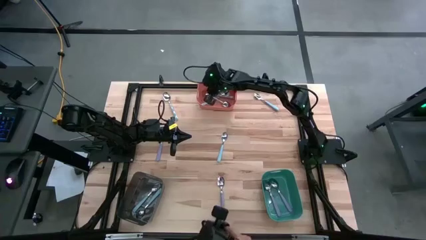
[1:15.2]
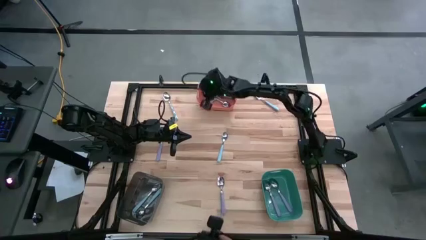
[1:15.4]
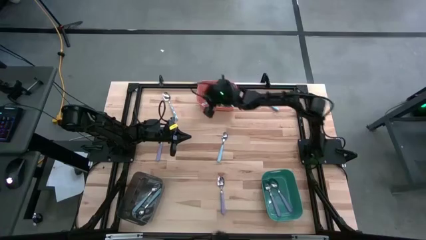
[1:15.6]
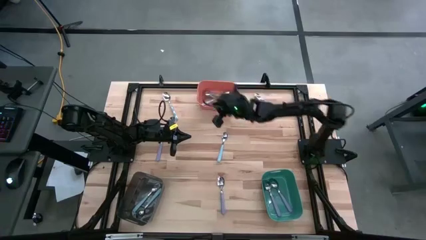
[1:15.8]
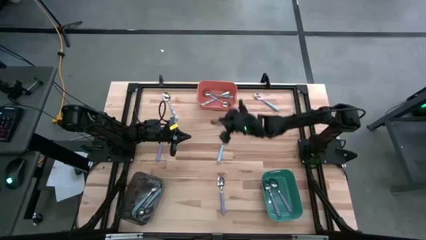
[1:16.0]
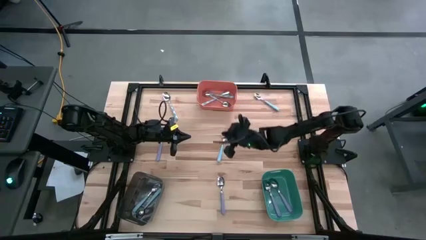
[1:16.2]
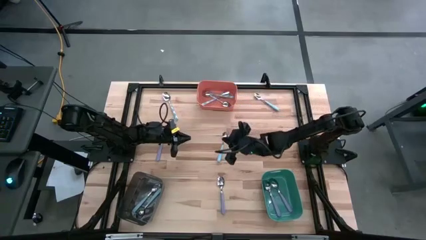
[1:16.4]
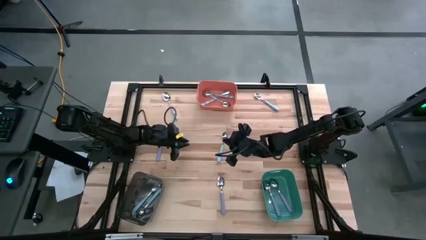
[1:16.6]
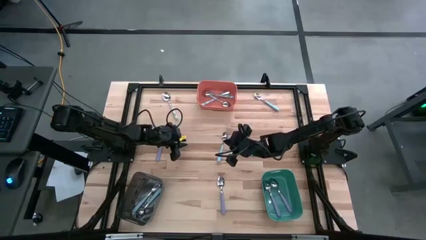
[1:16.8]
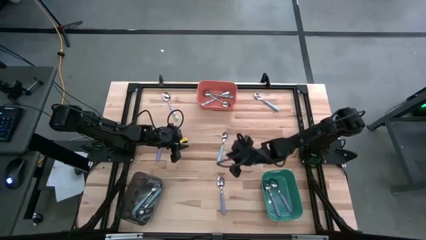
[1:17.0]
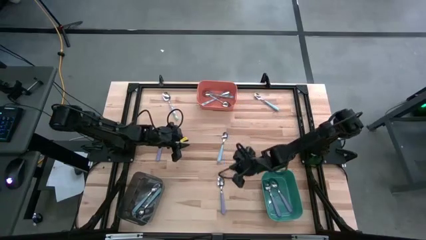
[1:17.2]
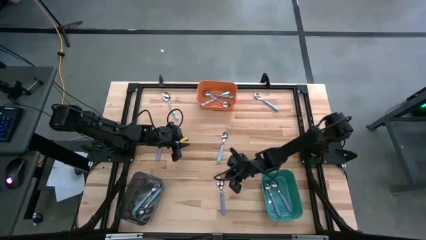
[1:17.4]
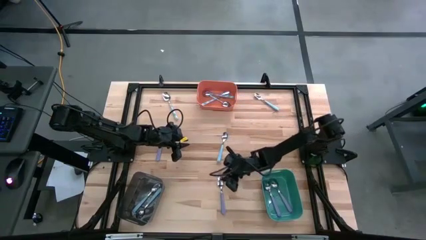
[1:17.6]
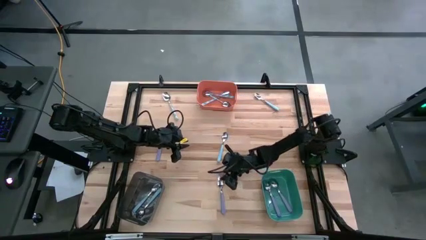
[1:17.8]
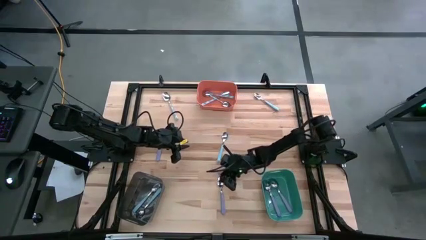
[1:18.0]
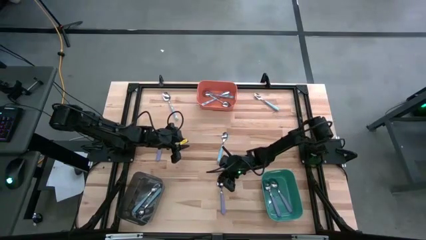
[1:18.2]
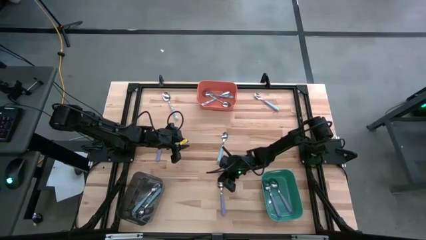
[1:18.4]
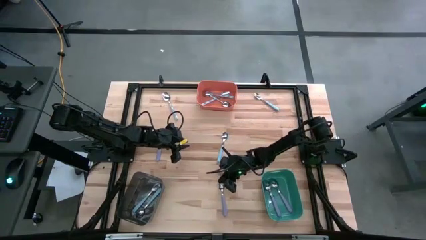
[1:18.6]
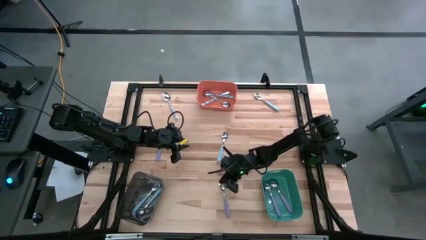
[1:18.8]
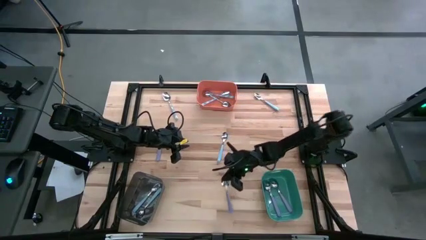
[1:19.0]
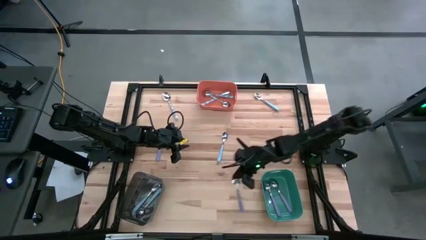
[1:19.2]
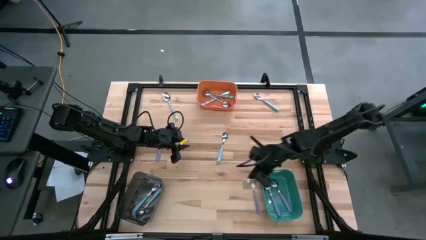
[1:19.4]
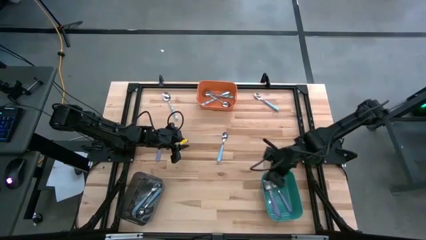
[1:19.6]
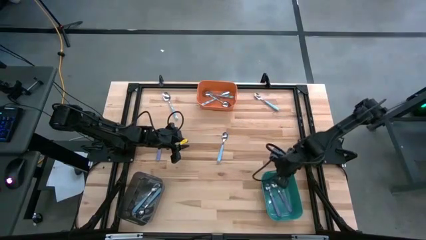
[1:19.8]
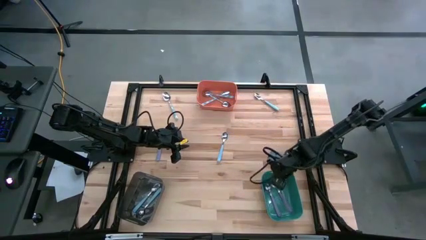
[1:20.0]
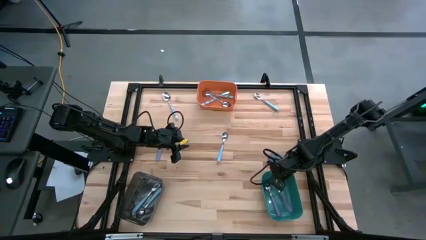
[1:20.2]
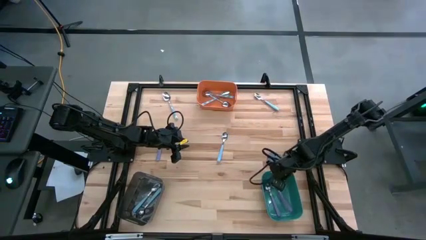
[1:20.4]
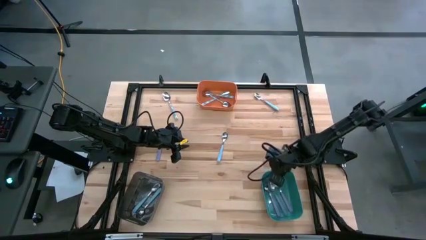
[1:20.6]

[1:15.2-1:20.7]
Task: Sort silverware by color (type)
Put the bottom violet spoon into the green bin

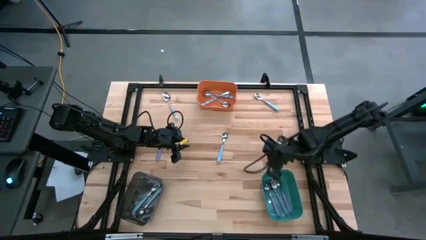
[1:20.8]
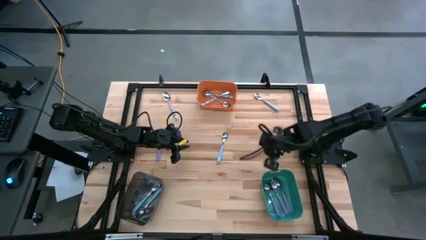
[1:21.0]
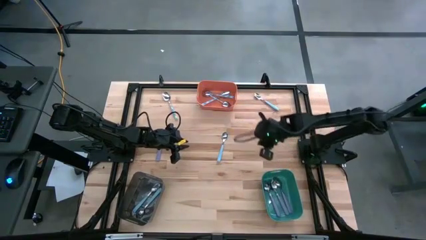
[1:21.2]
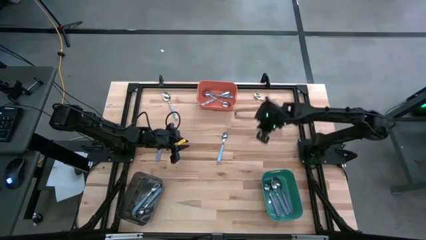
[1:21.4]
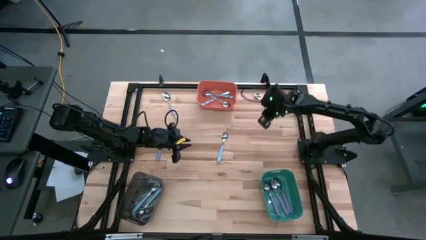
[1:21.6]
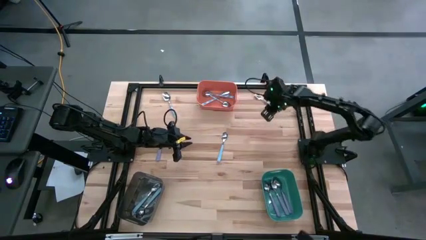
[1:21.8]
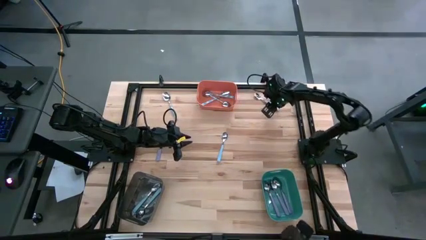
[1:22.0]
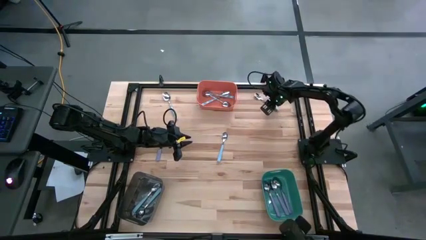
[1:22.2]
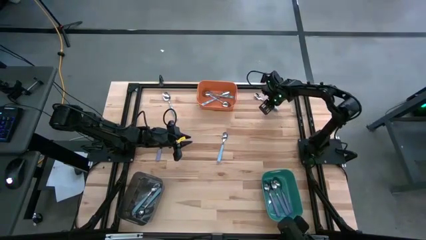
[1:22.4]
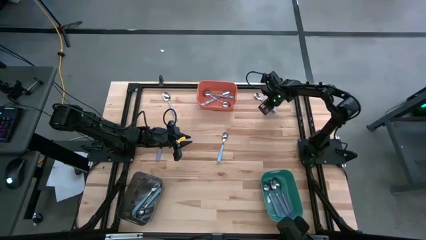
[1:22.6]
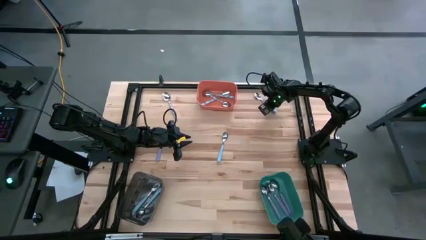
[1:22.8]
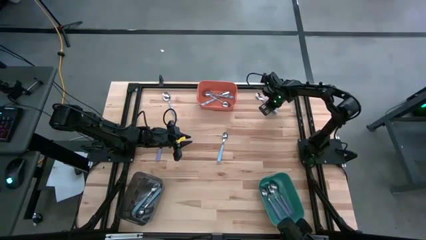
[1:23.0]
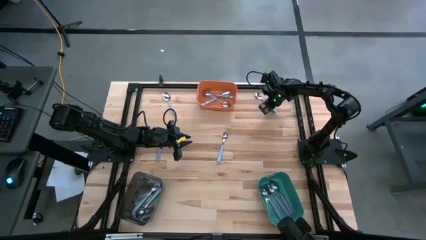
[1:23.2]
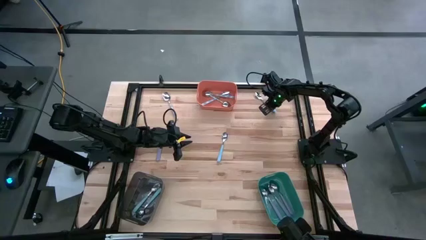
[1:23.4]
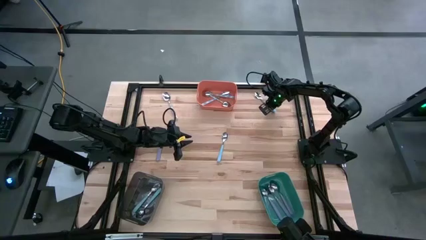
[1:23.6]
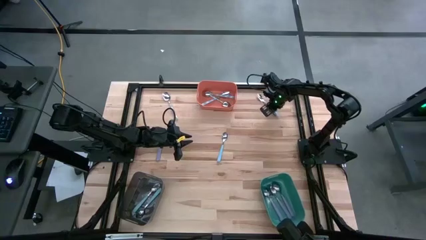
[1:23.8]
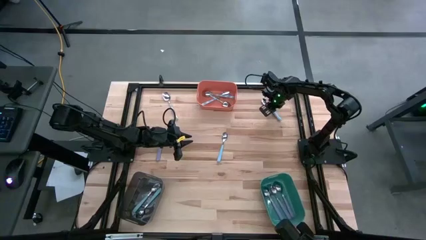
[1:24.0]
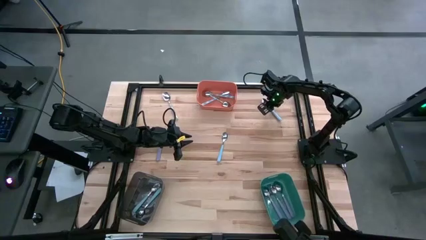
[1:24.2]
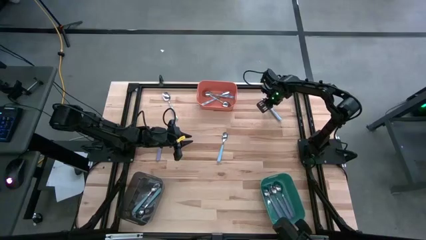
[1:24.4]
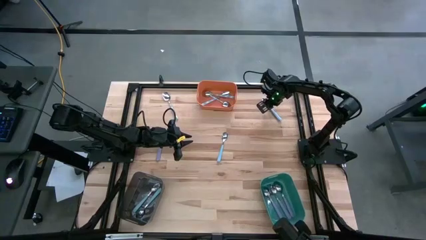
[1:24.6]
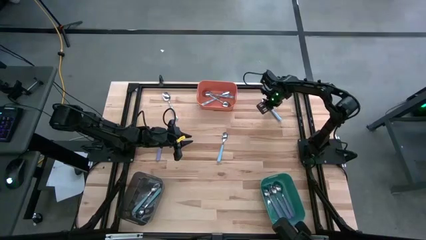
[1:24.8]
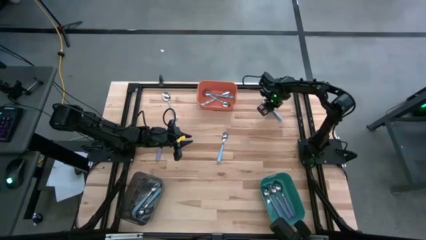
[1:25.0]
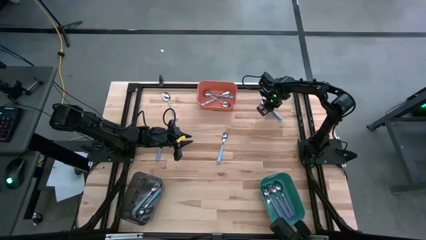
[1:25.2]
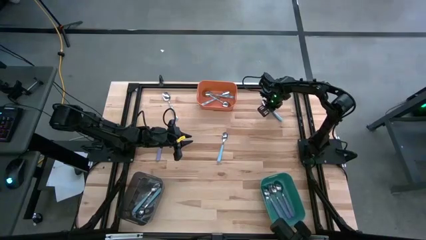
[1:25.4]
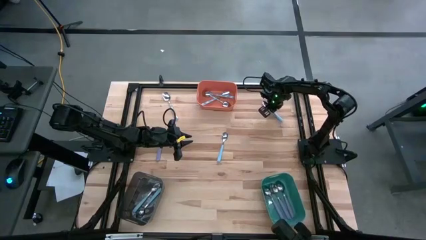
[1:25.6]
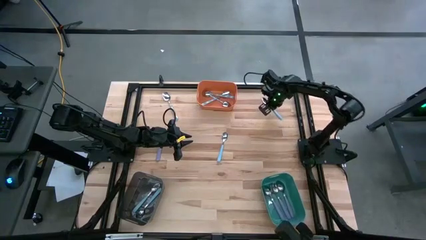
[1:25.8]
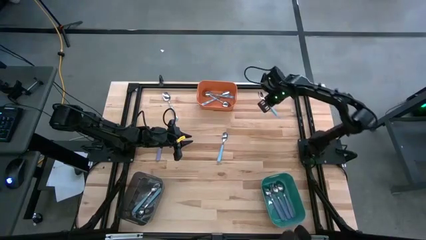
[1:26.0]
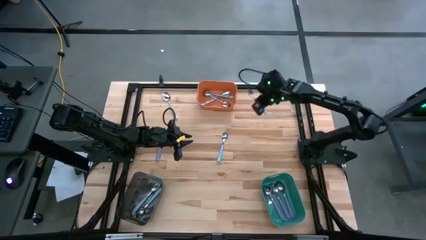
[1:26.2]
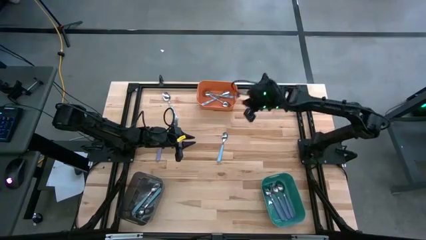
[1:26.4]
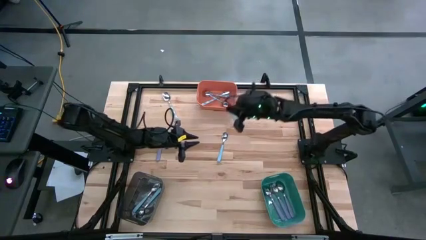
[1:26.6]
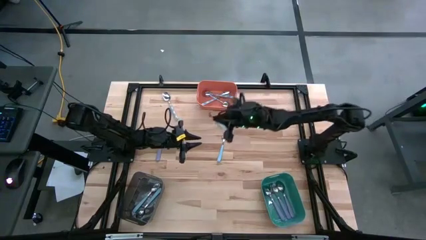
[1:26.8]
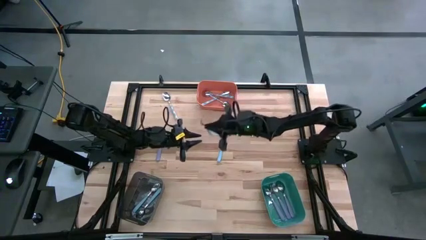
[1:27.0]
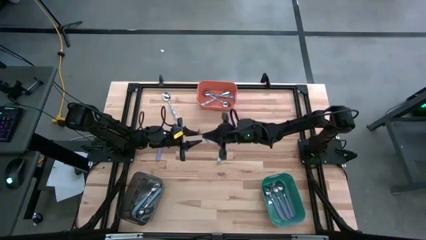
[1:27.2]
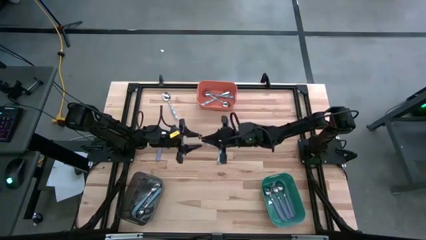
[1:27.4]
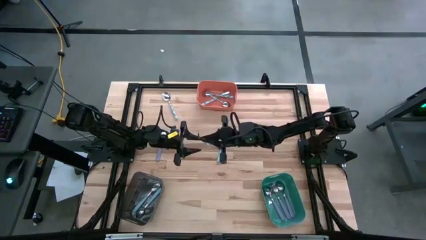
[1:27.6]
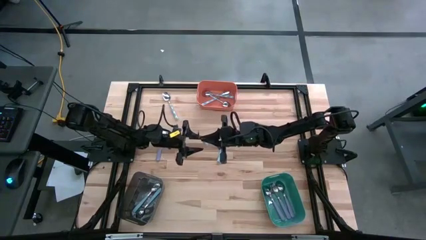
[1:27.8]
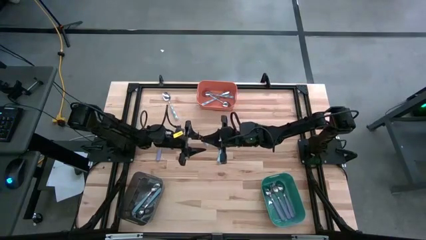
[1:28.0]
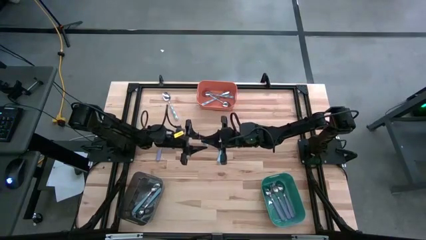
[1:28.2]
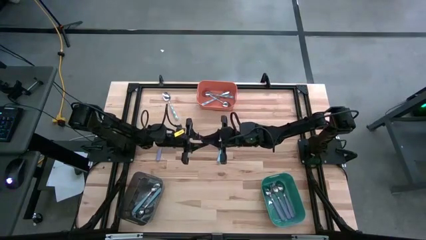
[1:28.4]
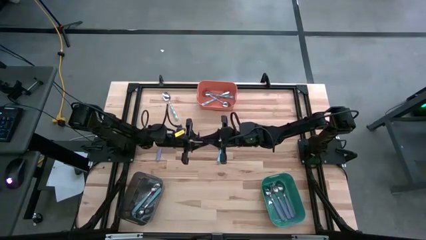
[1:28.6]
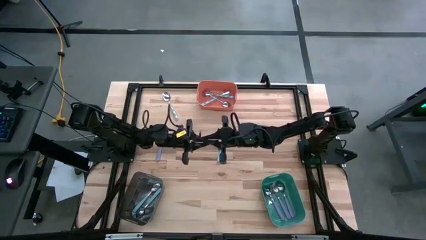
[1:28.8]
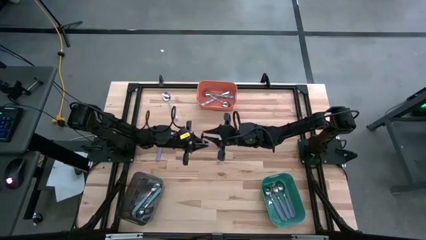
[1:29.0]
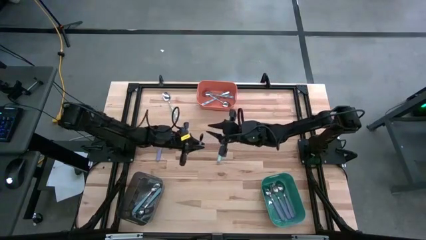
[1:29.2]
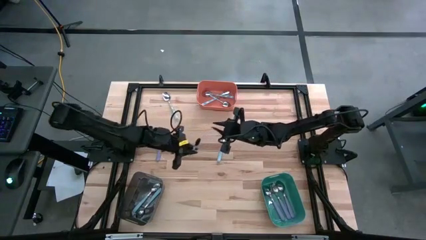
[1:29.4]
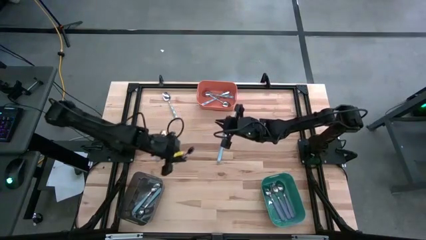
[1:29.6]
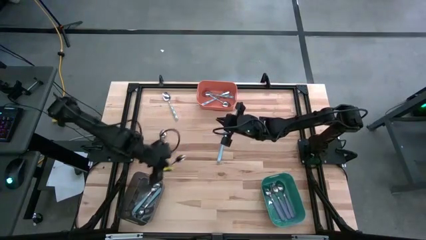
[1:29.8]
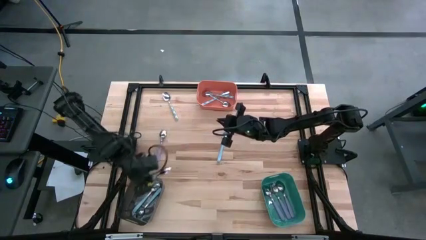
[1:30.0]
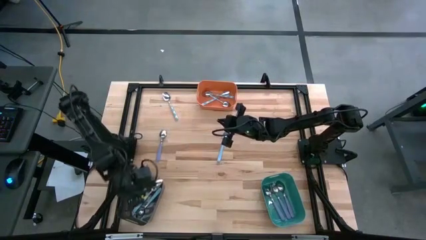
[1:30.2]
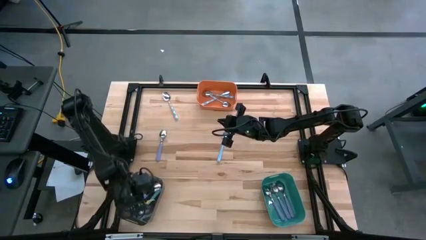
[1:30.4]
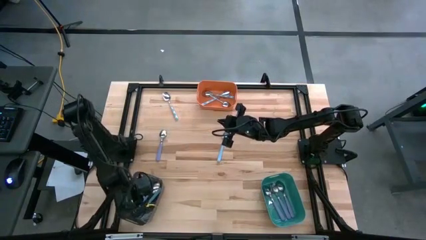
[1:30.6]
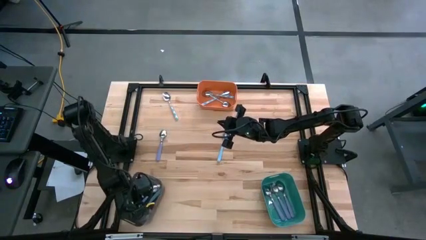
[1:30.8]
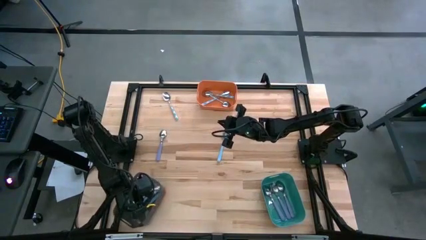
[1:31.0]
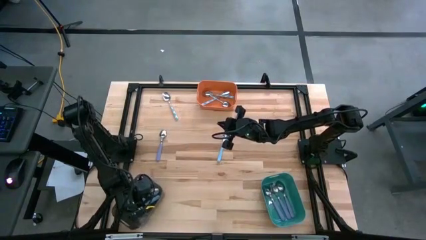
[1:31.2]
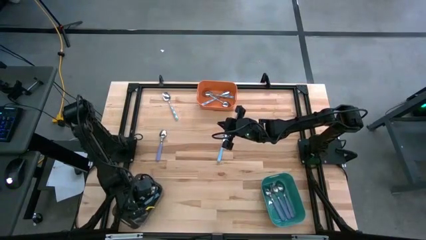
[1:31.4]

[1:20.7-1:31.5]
Put the top blue spoon into the black bin

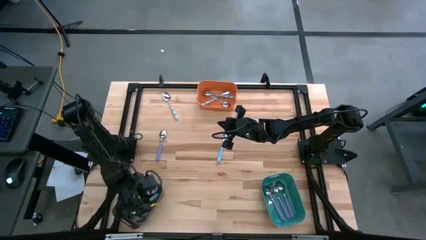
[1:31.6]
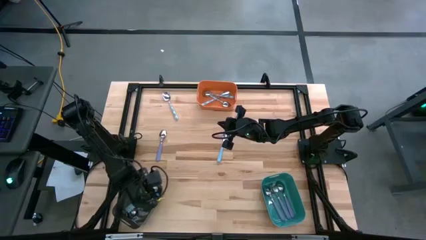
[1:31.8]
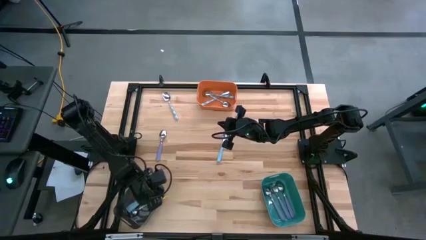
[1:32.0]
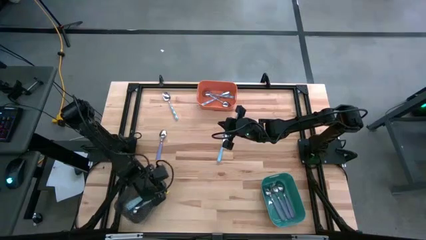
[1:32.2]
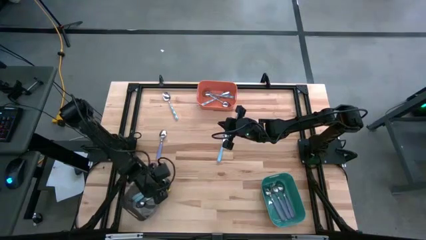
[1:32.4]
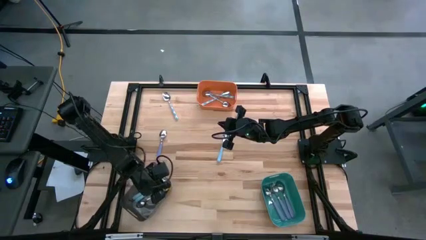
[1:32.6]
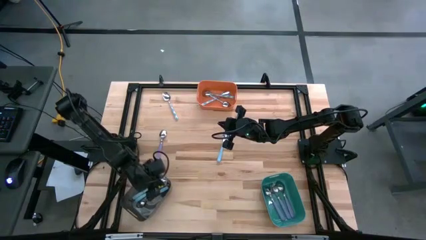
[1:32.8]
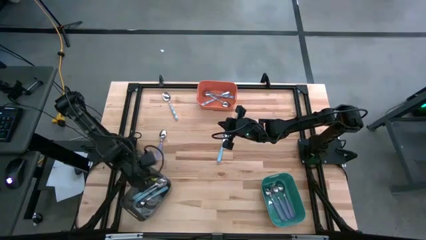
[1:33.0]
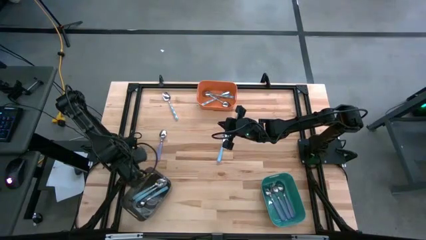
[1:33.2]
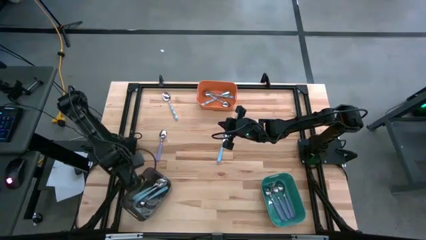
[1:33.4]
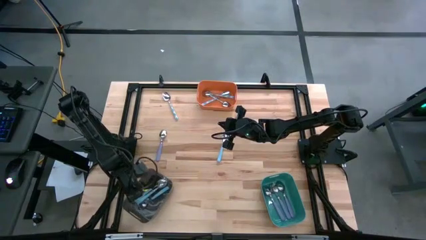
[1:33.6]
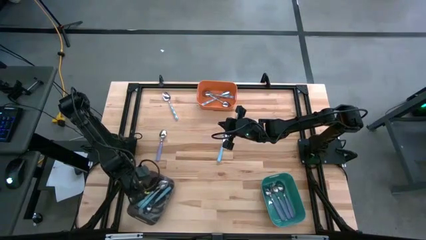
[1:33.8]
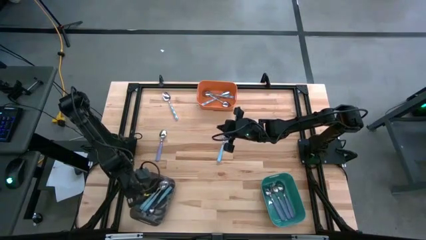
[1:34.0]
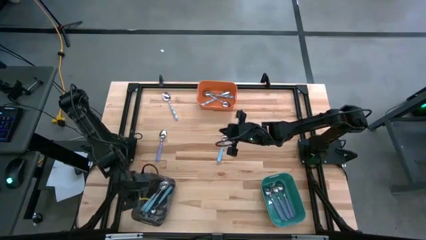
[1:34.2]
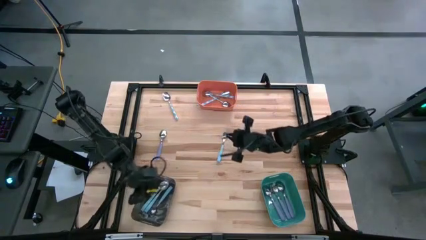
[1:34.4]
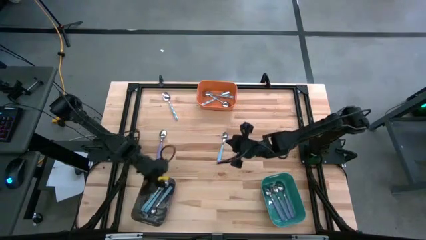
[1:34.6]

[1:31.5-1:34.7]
Adjust the black bin
